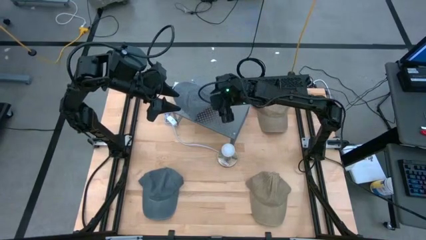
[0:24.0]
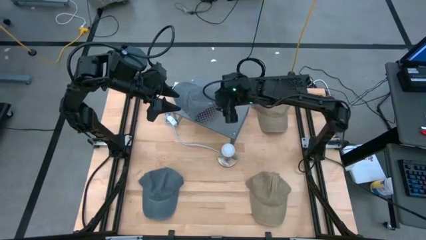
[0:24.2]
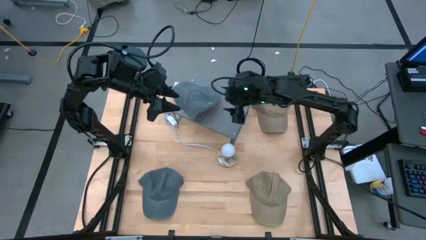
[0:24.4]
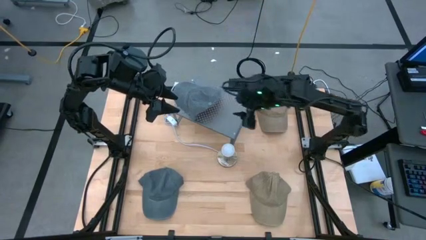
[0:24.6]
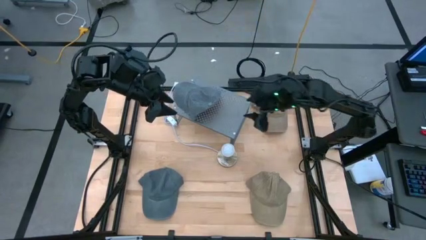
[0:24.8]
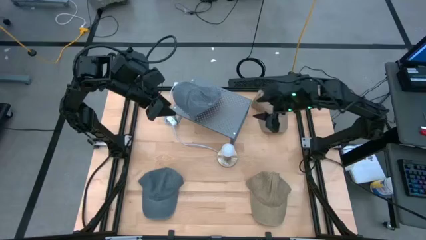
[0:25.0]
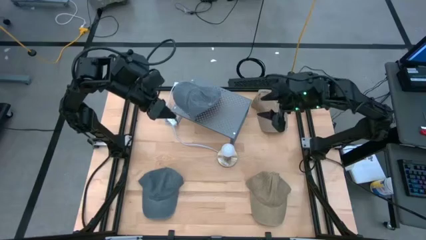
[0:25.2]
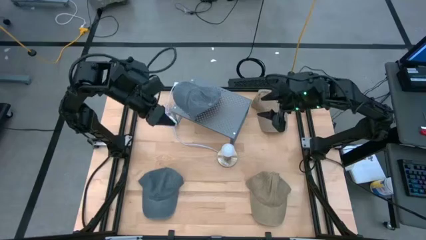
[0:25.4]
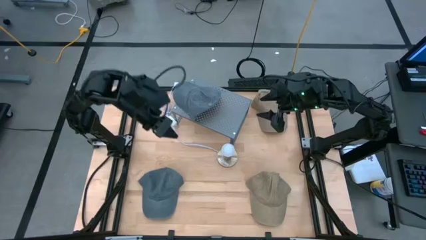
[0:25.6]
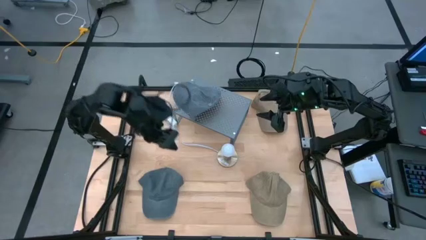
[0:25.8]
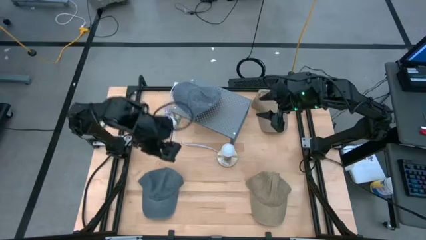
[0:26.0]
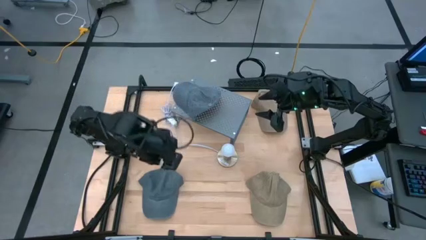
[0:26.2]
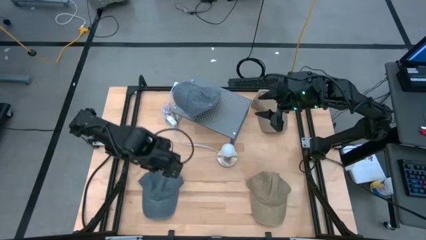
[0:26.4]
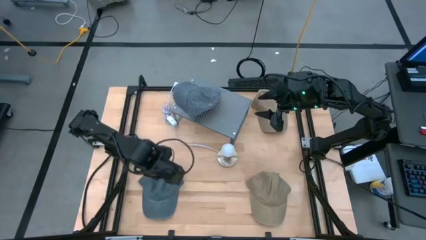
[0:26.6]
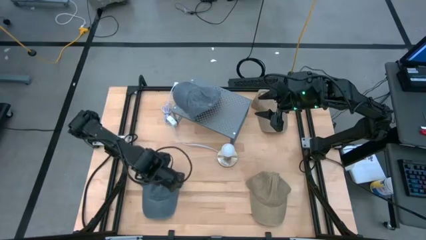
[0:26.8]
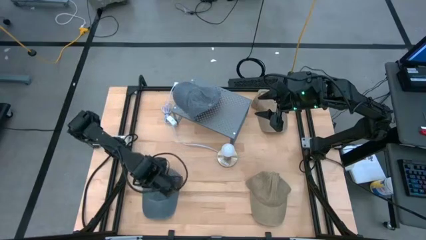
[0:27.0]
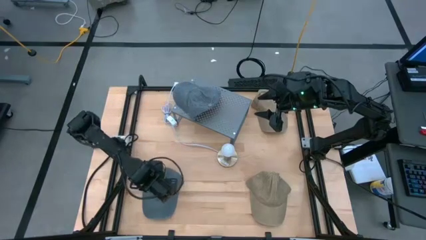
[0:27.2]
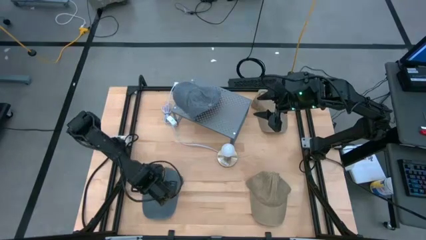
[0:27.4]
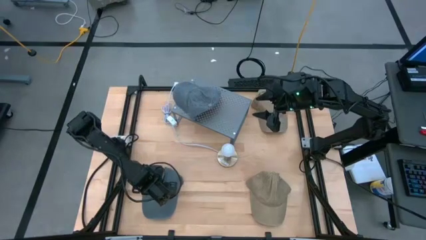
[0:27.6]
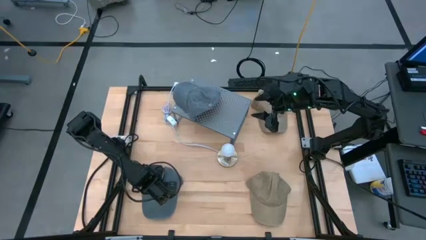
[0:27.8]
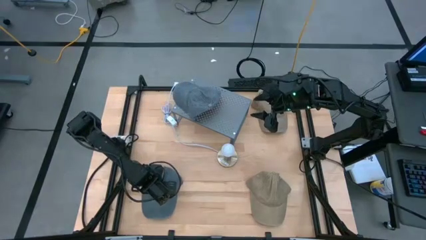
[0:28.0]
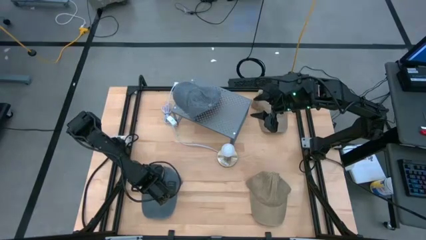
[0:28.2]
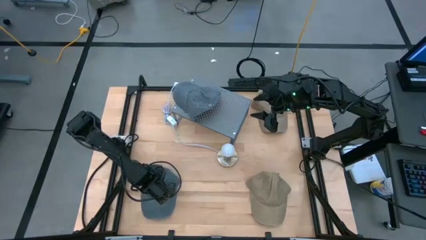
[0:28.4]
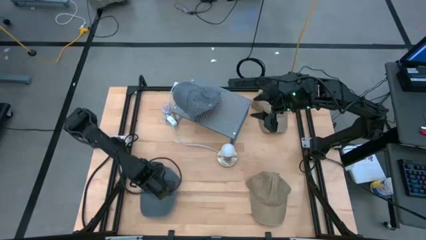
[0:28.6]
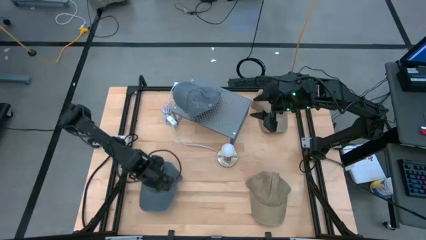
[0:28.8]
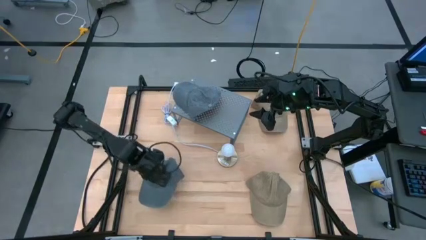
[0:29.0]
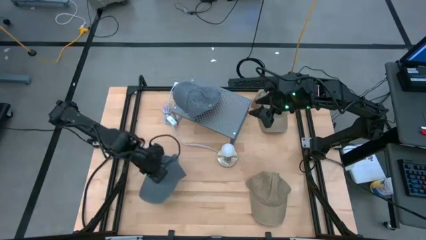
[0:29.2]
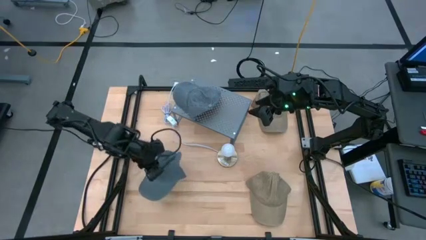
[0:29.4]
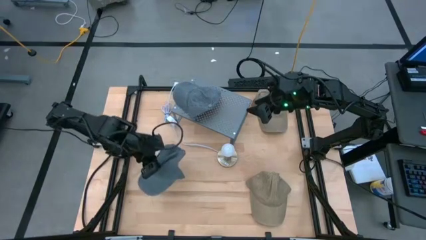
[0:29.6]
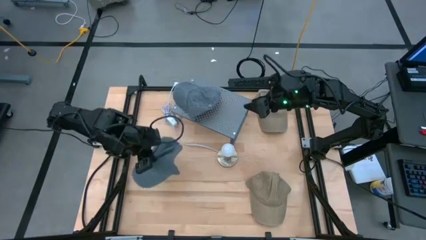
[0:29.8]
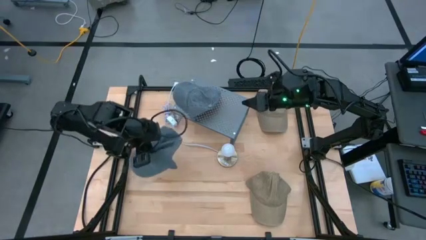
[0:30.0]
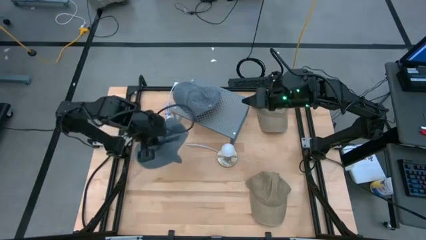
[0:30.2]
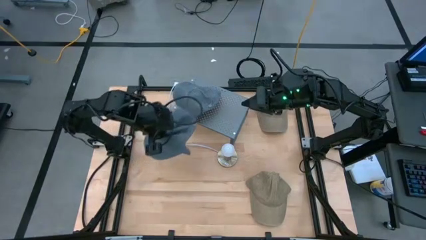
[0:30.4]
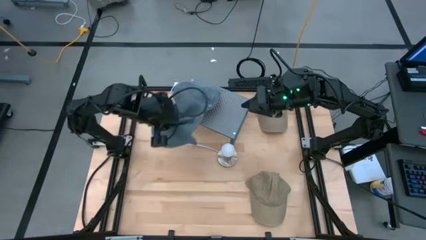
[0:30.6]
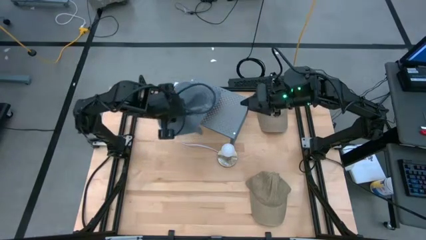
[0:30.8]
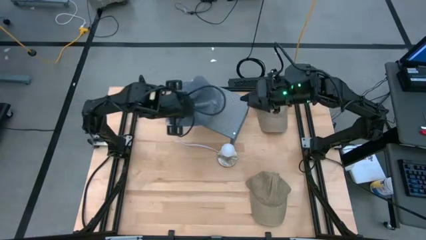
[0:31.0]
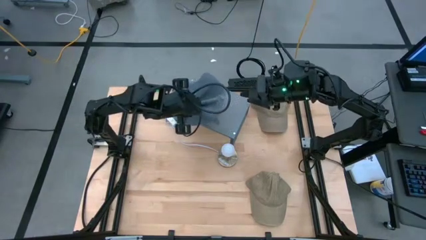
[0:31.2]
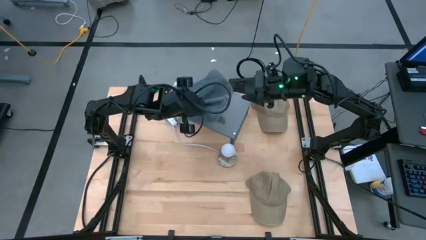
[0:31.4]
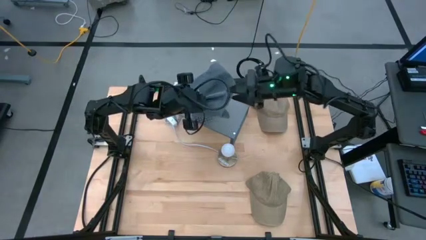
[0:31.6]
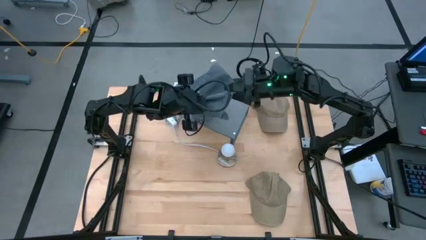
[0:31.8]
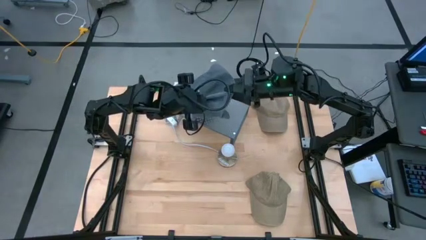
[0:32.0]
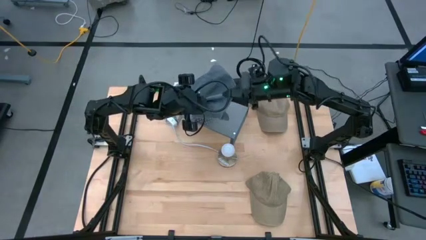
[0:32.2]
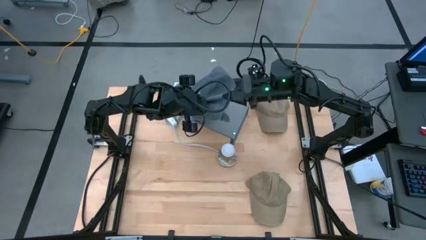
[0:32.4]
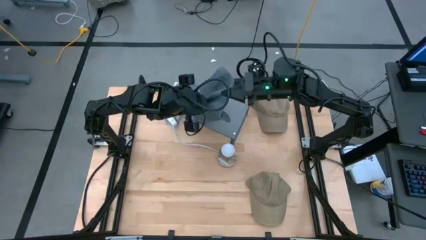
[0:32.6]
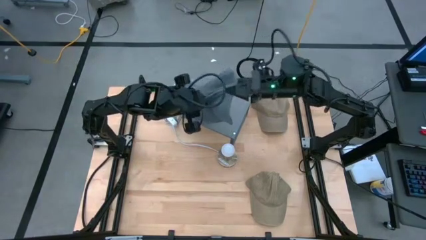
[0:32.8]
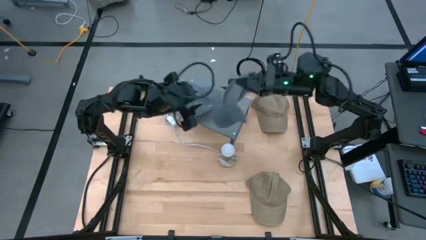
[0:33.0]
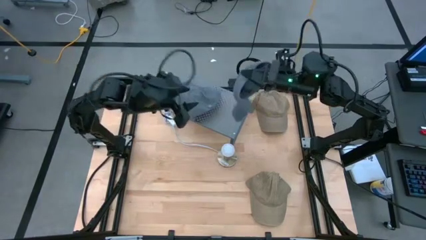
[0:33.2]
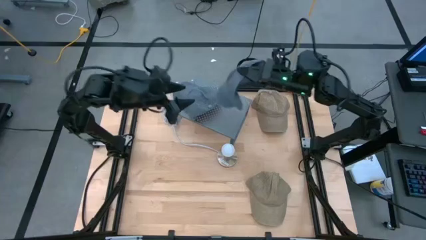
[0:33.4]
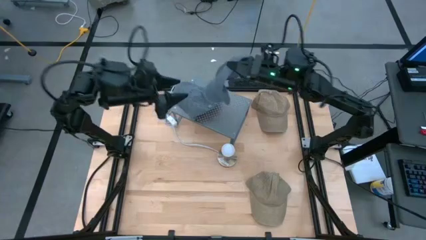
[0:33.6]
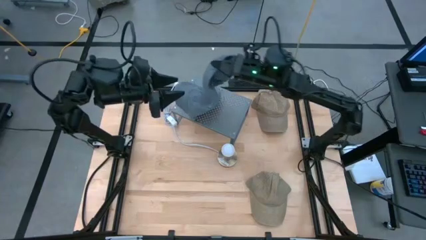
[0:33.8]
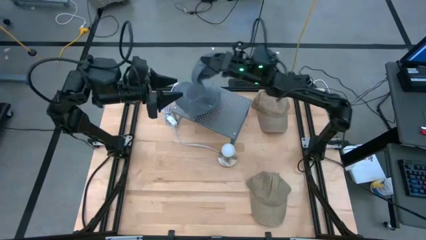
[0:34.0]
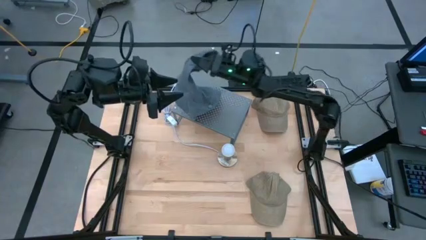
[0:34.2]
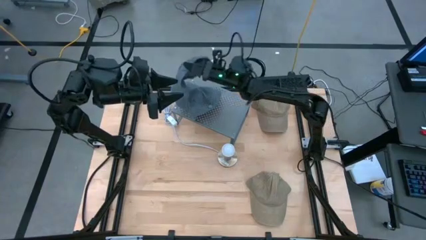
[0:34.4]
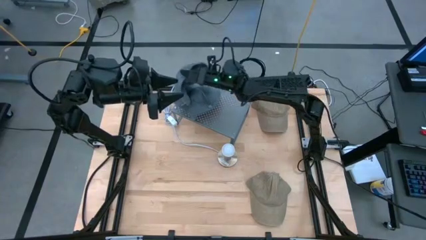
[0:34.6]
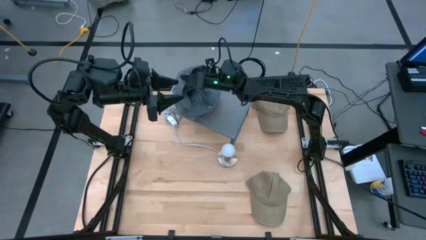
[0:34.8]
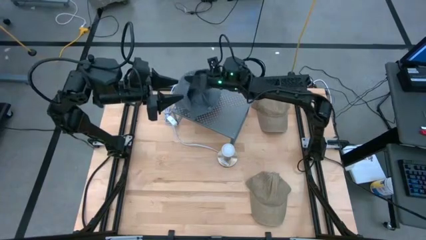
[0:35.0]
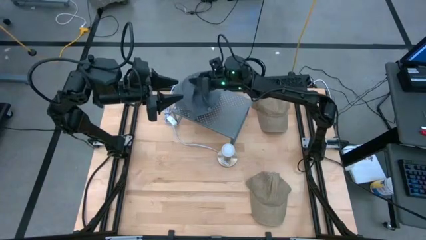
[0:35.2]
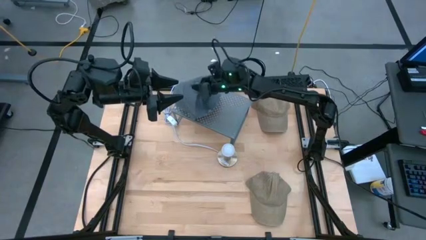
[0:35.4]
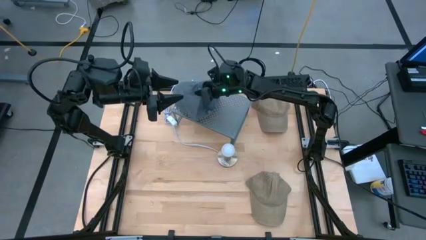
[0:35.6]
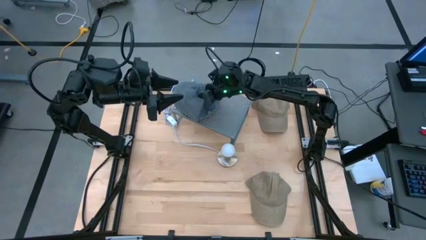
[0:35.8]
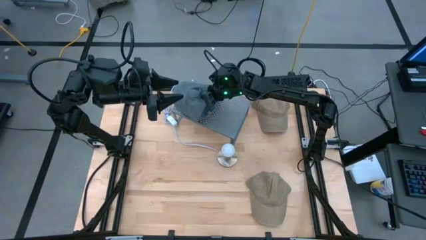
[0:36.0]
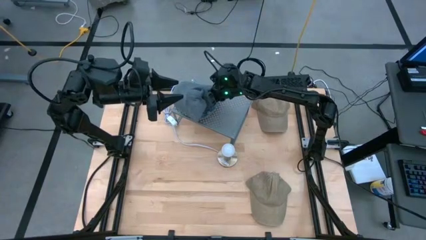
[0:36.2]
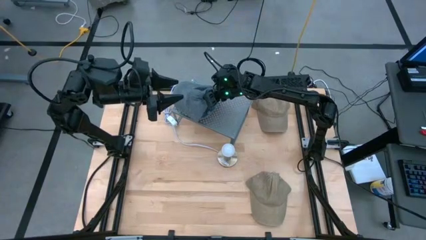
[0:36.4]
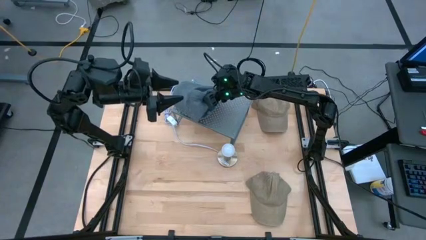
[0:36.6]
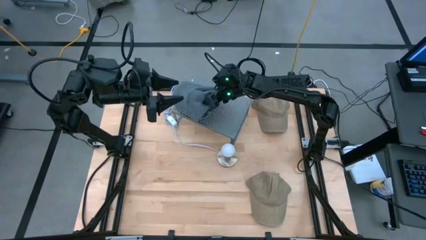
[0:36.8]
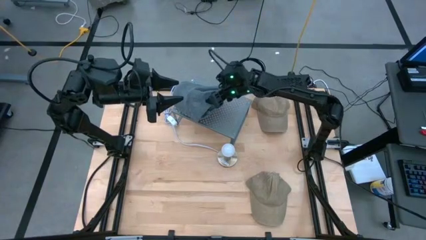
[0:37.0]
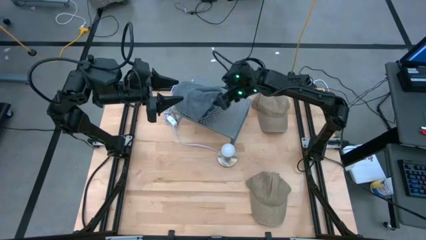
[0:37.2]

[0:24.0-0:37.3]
Task: Pick & Place hat
Stack the gray cap on top of the gray cap on the shelf

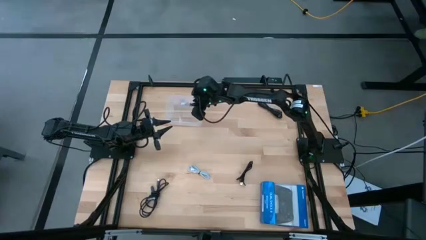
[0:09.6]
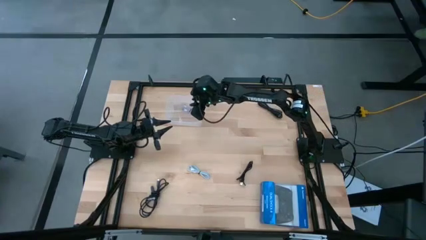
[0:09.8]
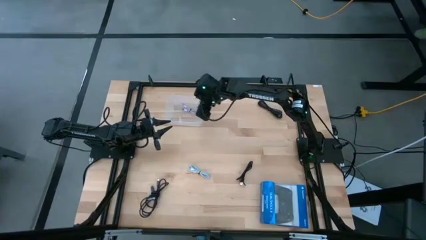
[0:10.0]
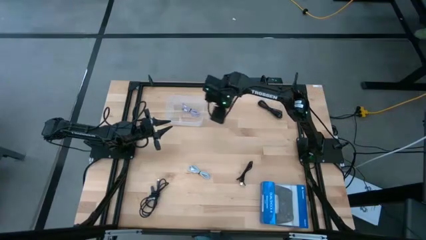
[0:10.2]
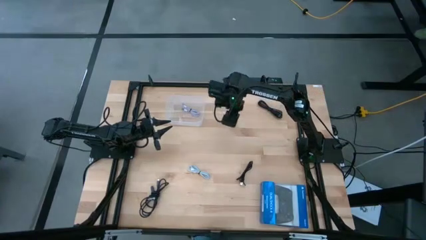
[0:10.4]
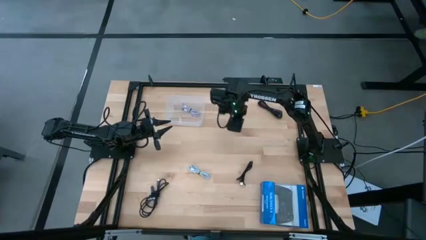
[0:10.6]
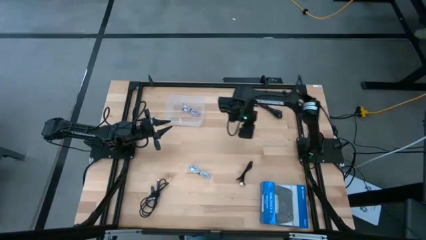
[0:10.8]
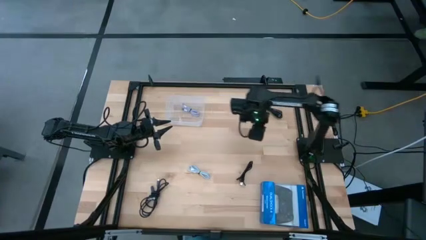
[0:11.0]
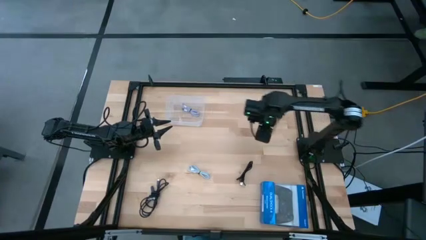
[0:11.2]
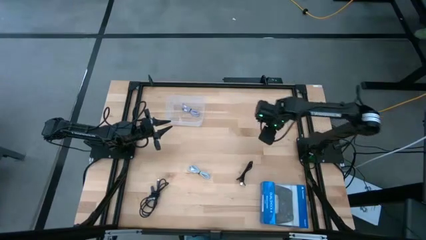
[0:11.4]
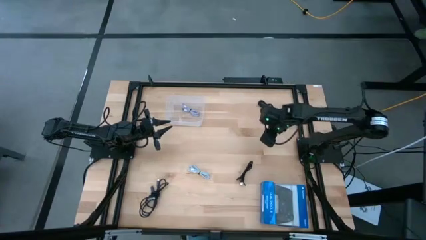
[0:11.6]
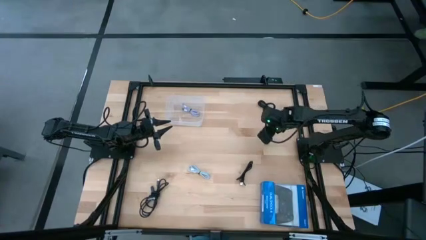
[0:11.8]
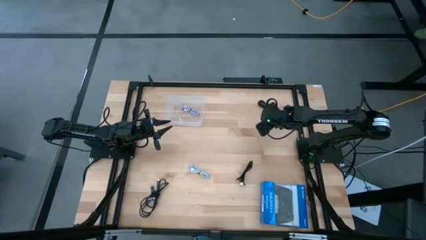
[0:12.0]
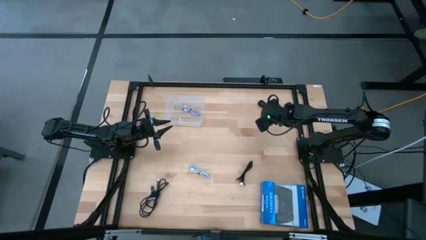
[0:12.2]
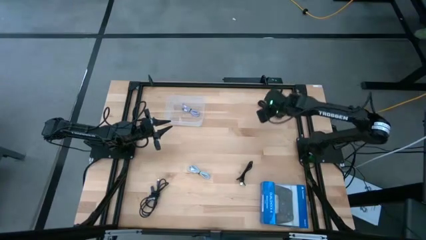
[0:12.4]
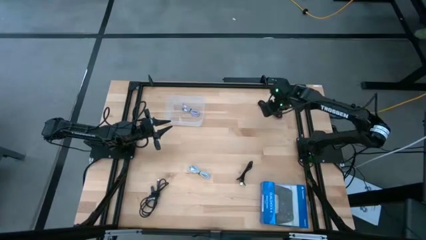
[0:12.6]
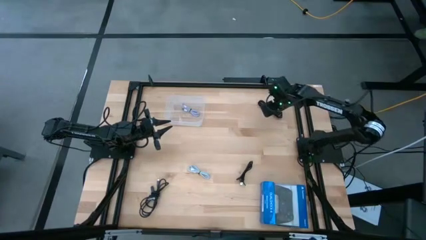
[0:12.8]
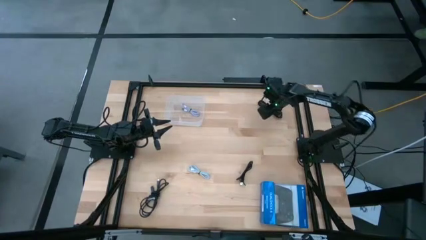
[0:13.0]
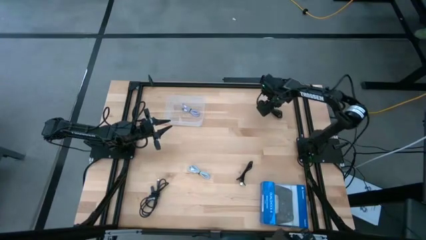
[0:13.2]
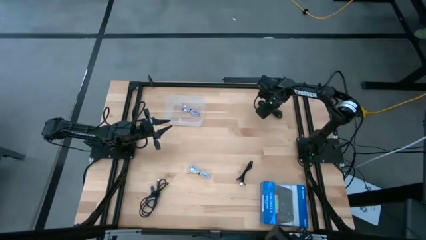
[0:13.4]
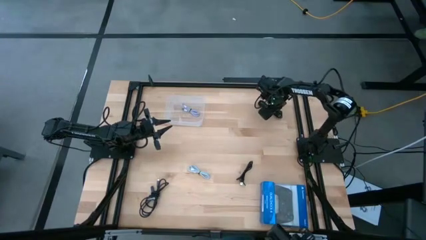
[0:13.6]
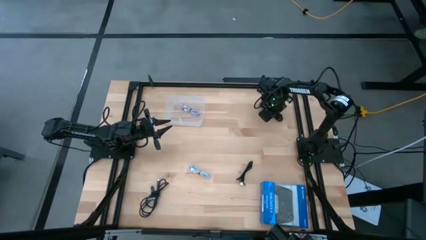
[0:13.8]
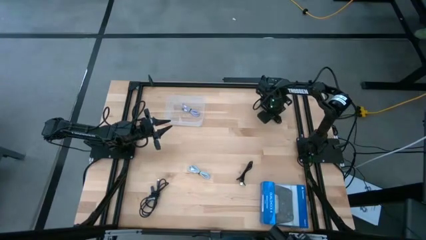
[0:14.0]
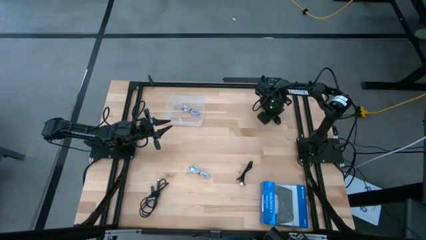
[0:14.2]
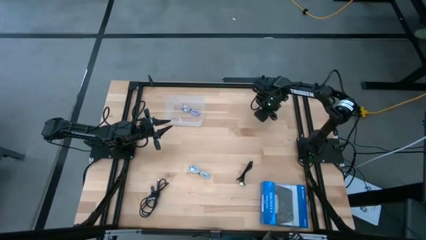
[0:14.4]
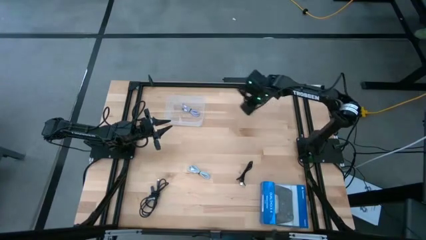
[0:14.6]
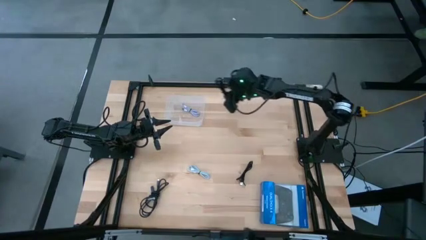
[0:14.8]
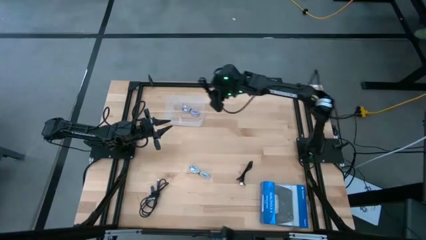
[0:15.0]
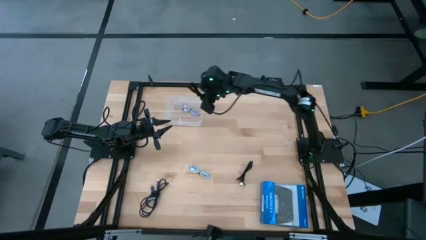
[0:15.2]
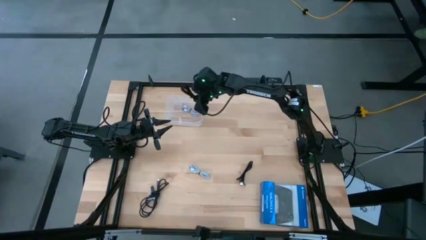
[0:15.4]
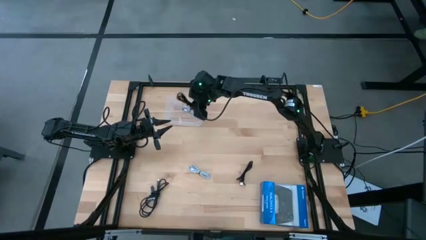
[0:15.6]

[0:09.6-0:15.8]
Task: Pick and place USB-C Cables
Put the top black charger cable into the transparent bin
